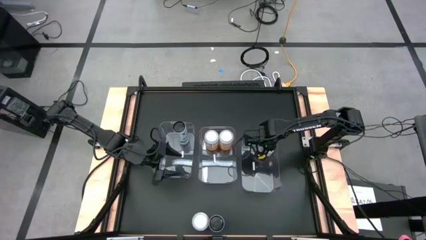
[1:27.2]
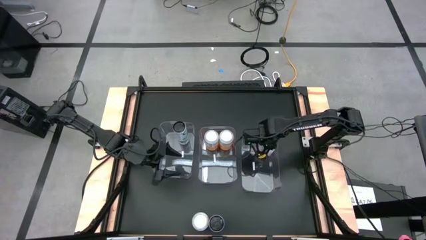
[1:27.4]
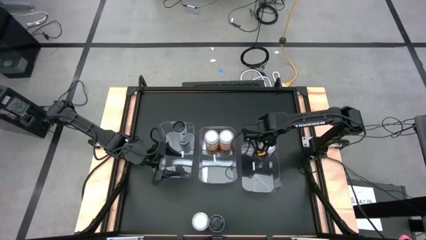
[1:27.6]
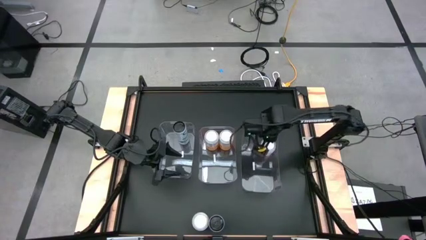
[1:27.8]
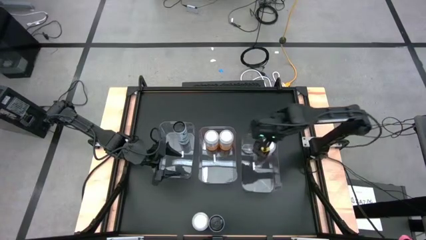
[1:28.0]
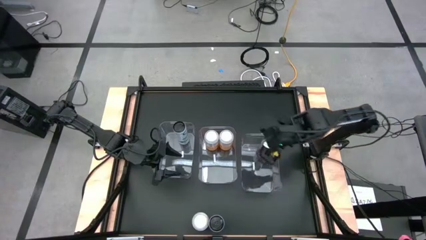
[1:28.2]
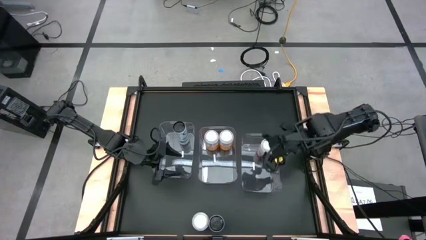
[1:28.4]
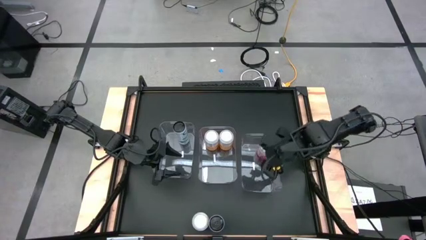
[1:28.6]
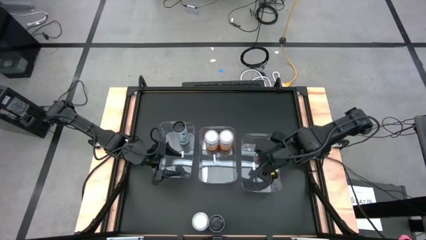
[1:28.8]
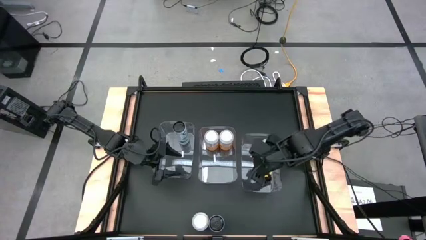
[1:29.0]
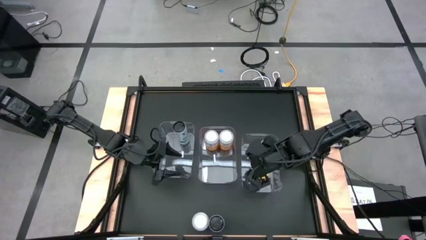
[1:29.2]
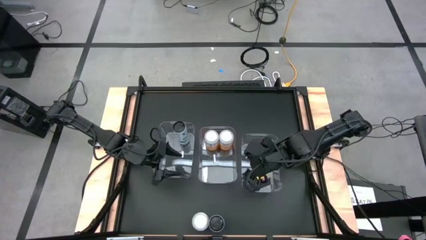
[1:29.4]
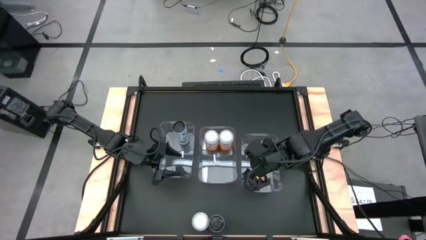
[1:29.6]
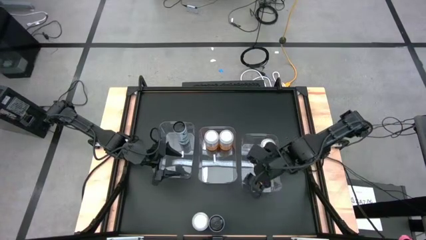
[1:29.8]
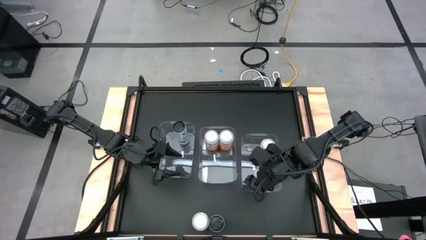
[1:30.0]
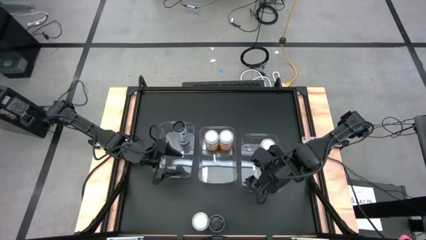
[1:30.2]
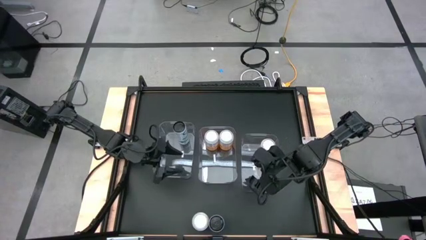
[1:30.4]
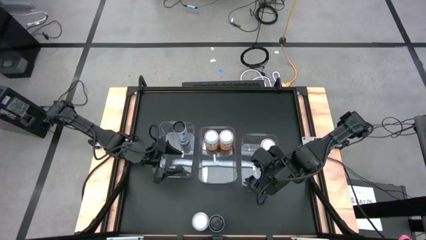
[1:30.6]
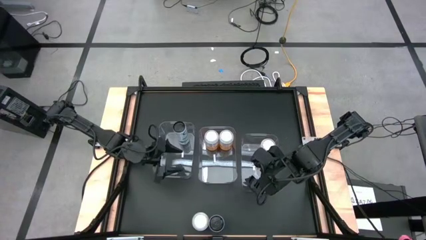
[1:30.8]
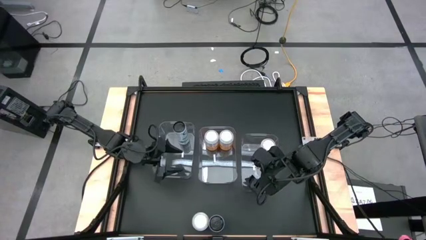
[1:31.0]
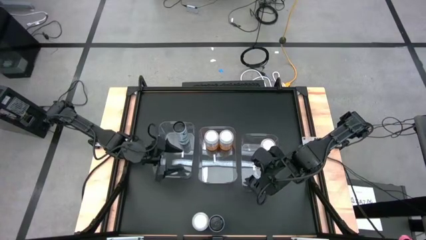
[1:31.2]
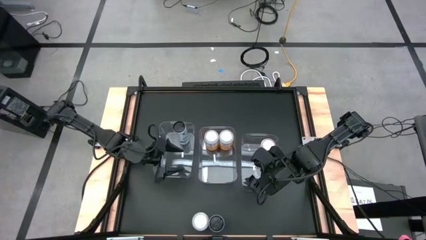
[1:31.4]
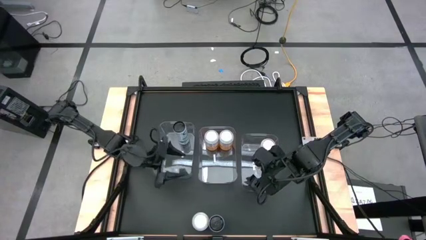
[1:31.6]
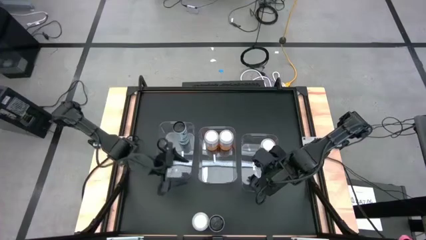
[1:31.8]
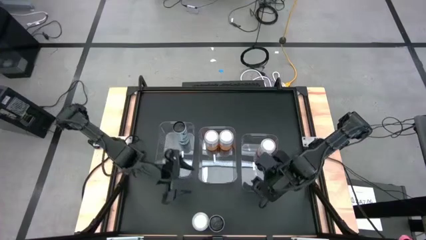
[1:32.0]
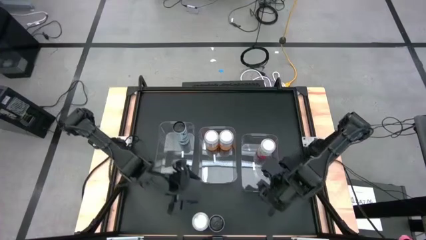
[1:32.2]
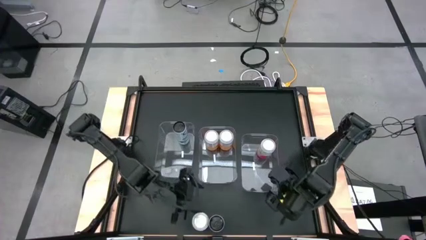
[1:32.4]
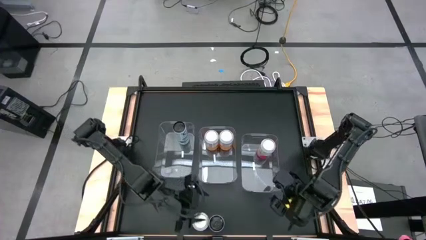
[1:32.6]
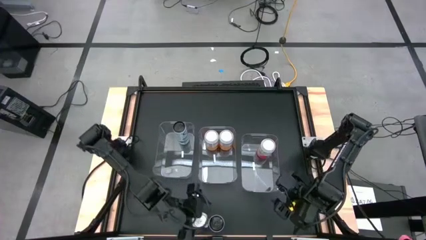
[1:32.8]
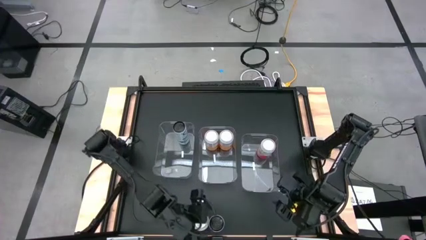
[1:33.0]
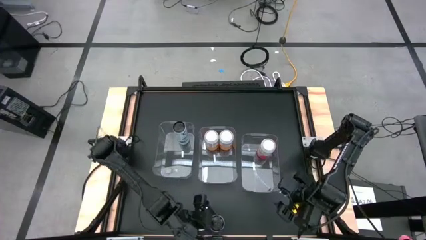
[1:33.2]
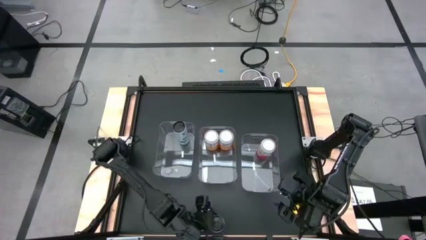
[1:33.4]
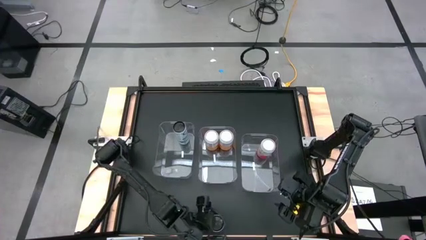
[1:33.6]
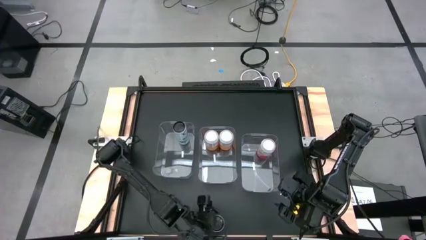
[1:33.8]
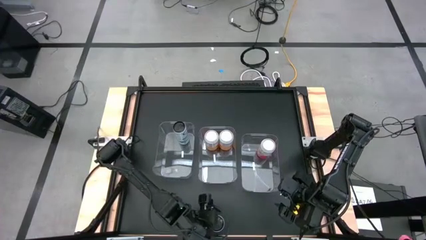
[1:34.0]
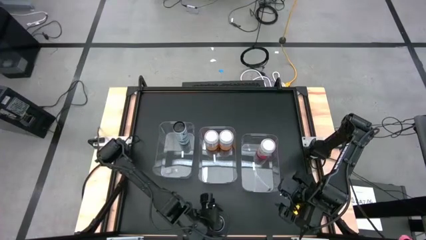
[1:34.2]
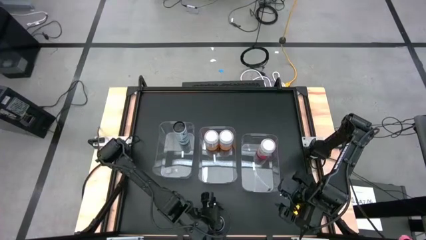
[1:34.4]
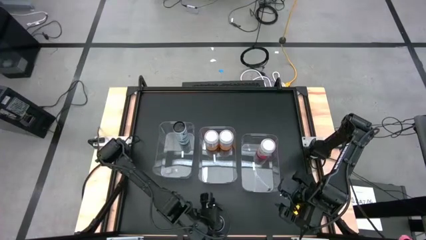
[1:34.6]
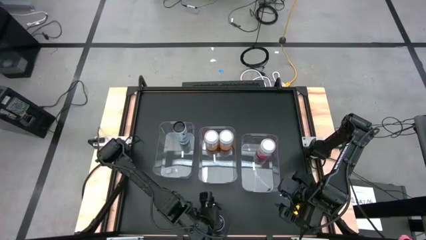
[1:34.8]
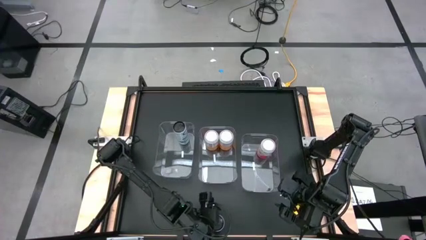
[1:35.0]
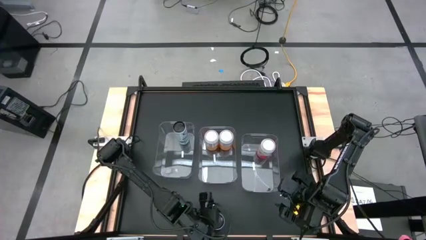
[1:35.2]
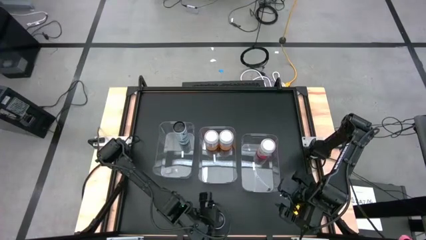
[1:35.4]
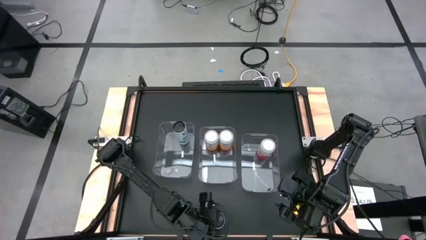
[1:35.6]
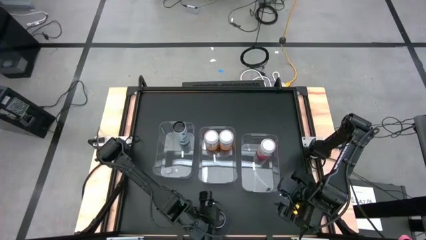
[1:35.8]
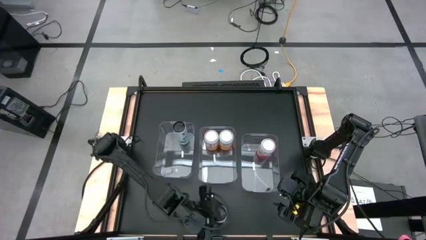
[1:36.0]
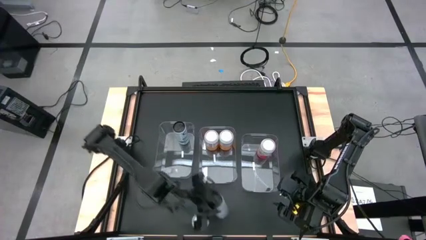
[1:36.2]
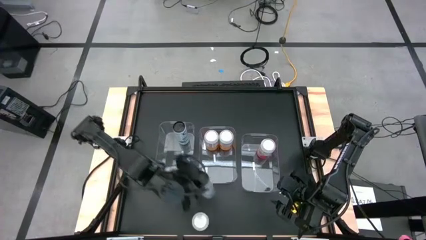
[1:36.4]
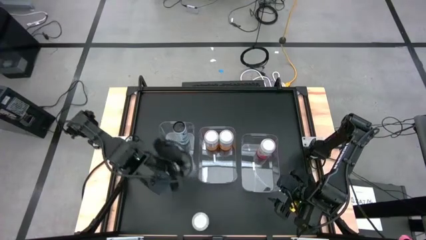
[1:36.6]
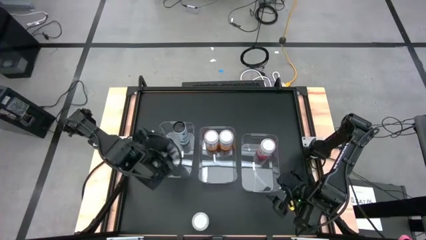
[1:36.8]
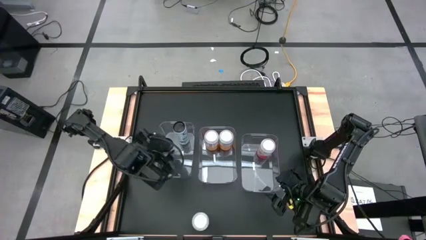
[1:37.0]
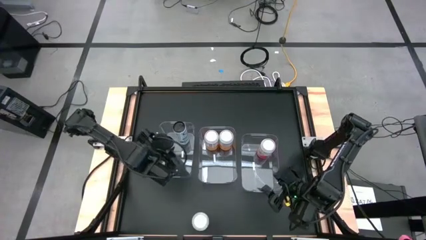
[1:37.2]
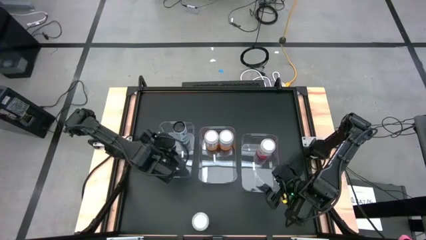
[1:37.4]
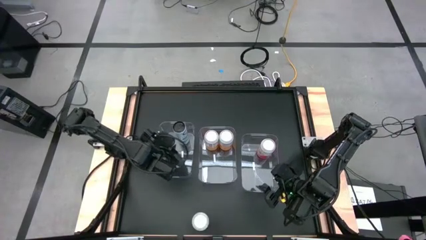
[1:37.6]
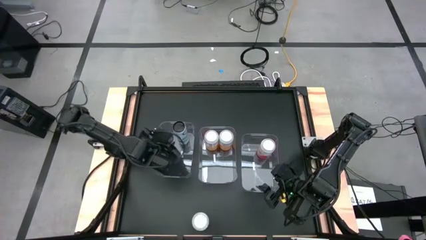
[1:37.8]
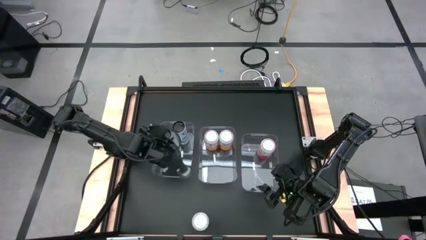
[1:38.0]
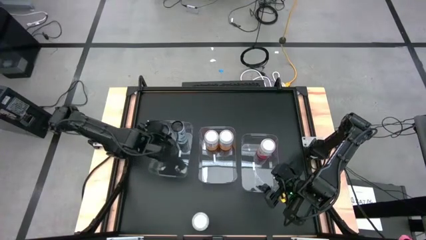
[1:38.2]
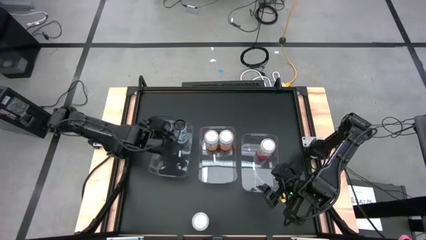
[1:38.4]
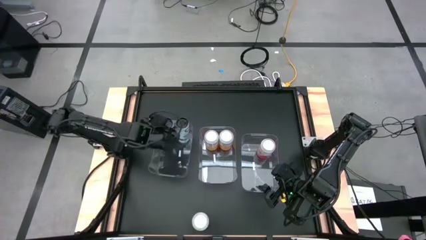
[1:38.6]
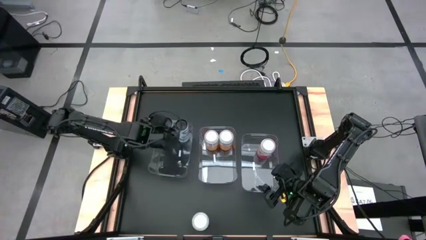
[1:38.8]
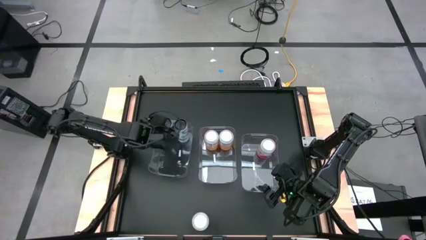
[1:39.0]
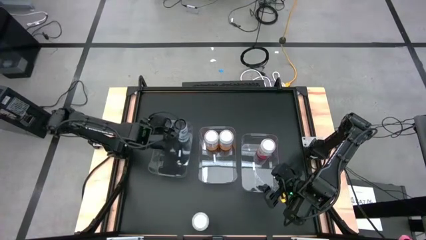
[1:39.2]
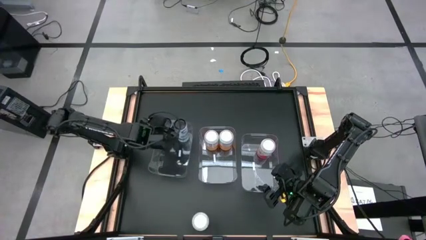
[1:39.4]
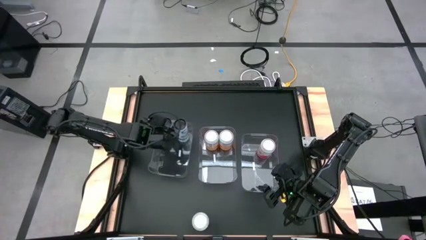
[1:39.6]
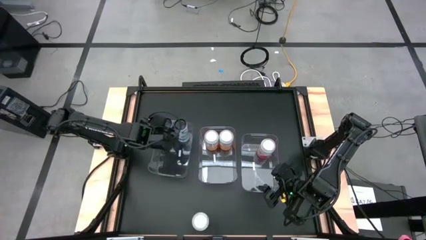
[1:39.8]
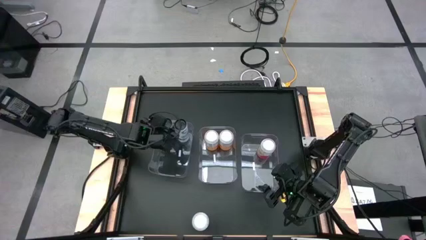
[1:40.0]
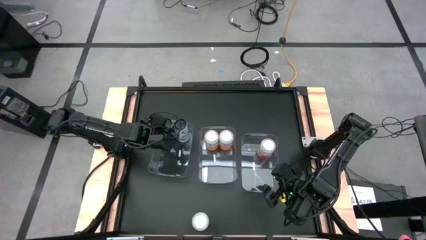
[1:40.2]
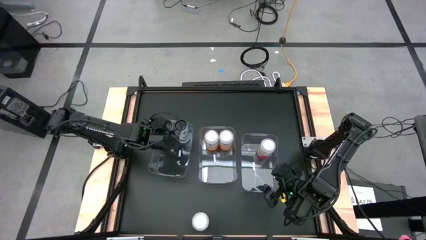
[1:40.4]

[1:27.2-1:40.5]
Task: Sort soda cans
Put the white-blue soda can into the left transparent bin

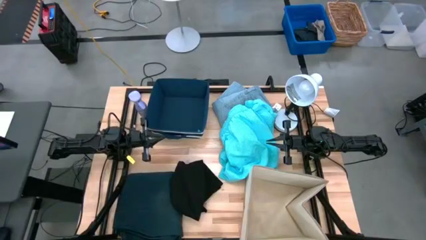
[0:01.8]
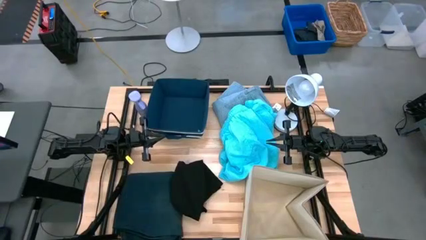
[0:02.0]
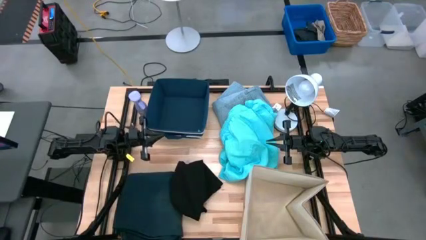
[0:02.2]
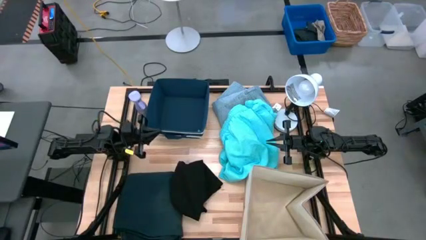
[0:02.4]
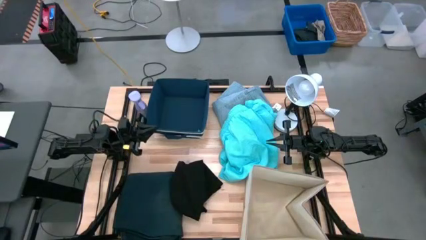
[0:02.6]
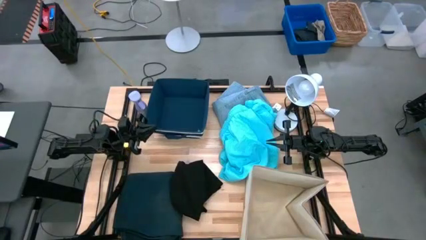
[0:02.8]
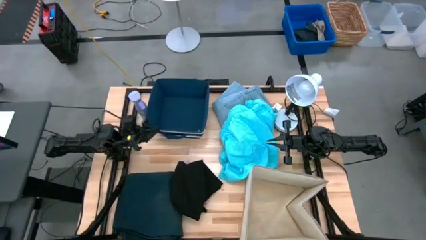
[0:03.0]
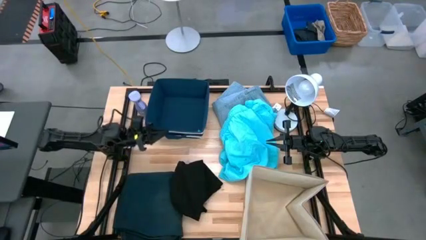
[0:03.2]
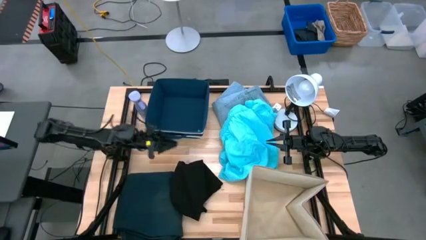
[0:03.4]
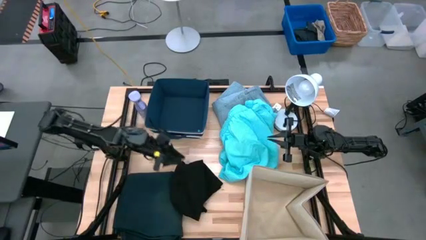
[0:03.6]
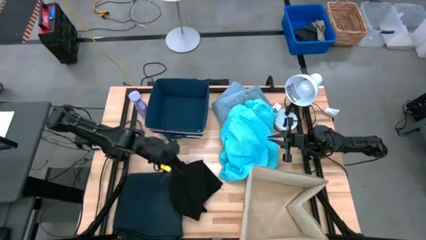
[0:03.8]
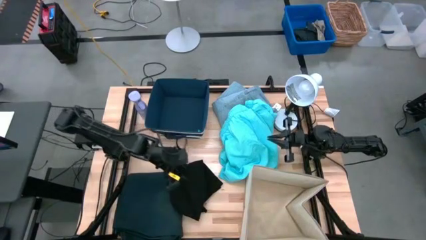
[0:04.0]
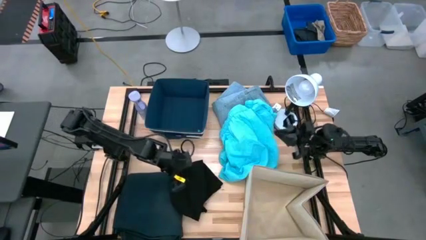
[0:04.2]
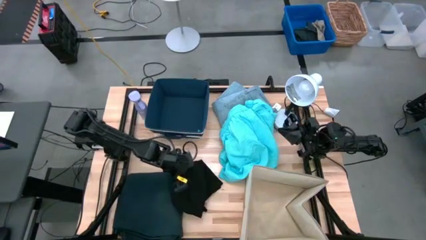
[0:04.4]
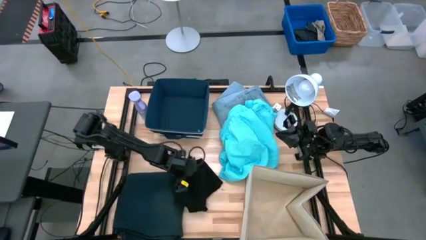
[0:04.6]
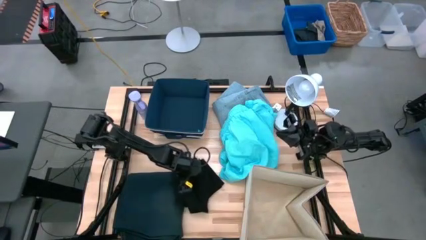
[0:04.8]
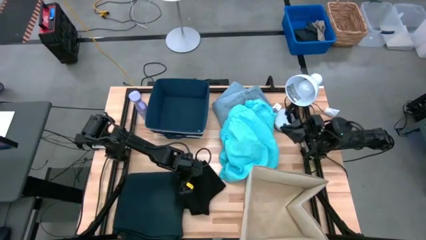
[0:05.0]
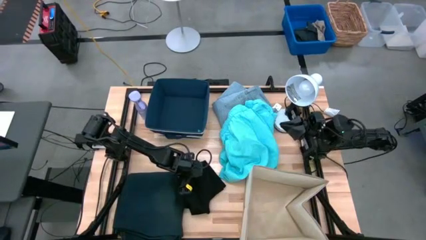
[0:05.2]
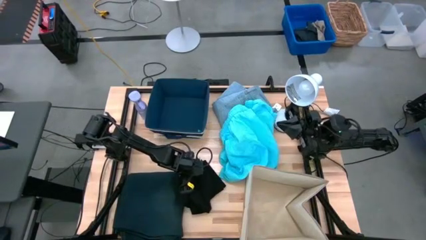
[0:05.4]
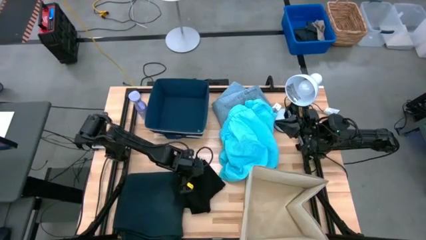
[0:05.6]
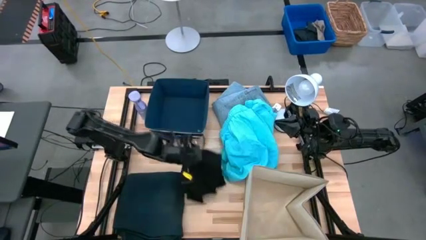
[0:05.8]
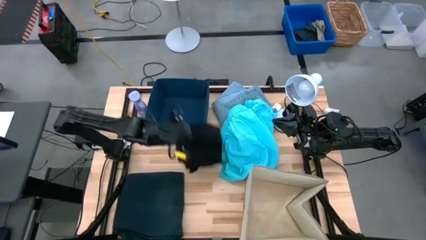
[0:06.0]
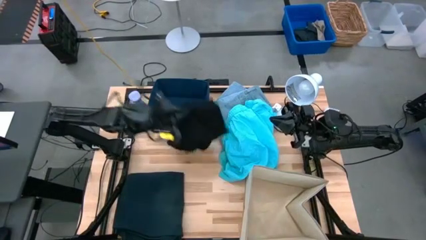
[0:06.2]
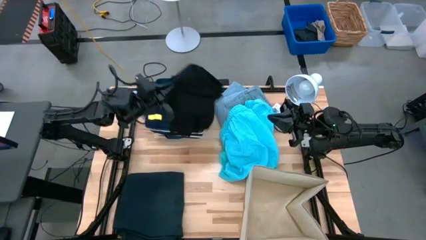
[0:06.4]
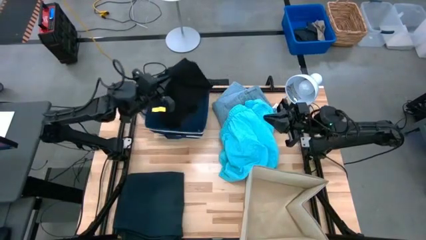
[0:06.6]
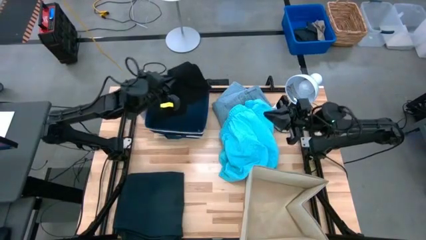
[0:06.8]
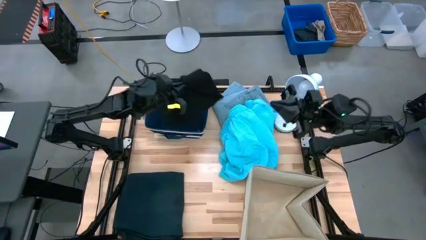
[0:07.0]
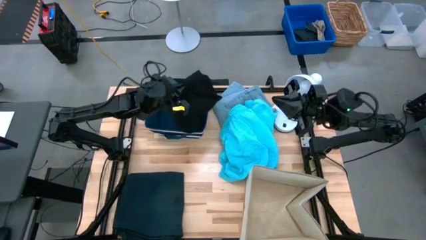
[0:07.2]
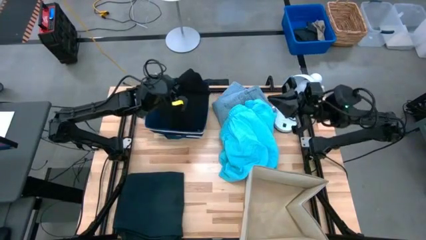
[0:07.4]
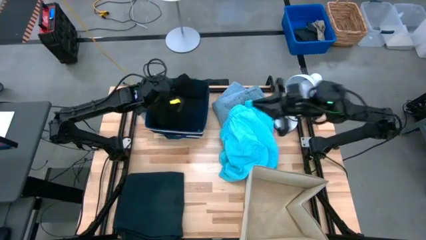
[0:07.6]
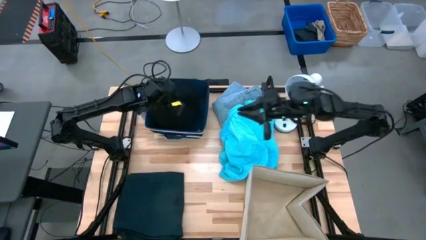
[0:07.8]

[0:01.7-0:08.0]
Task: Sort clothes
Put the black shirt into the blue laundry organizer
